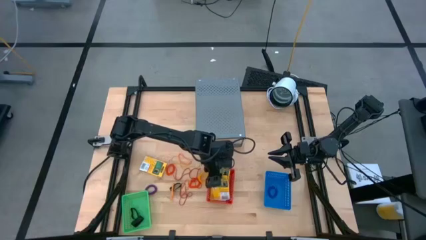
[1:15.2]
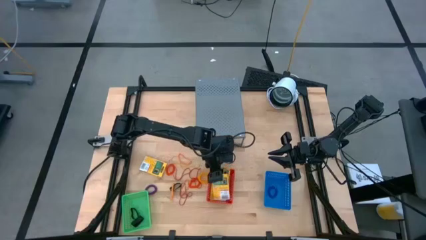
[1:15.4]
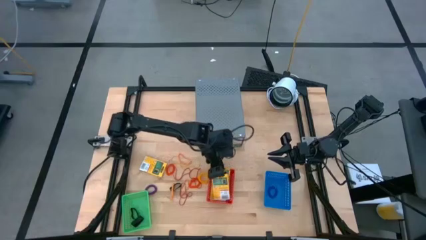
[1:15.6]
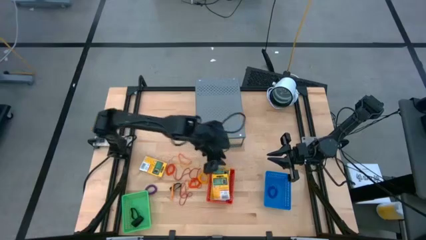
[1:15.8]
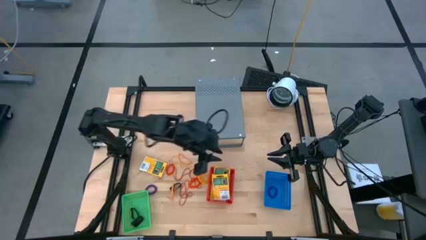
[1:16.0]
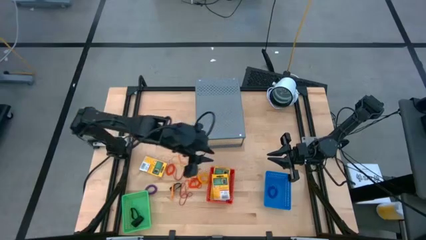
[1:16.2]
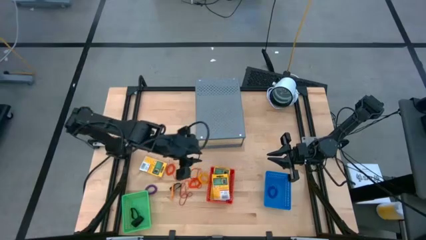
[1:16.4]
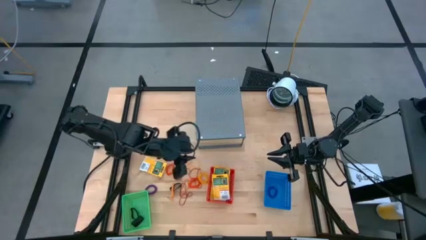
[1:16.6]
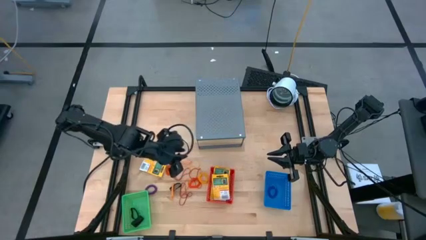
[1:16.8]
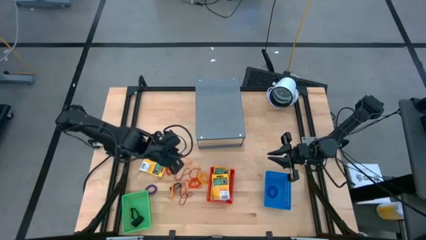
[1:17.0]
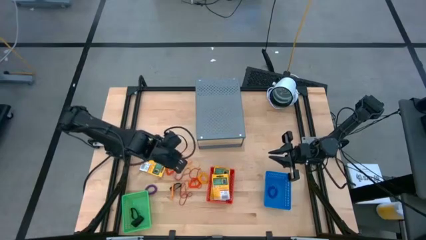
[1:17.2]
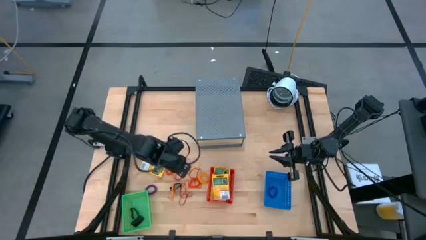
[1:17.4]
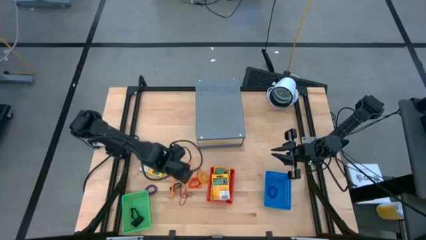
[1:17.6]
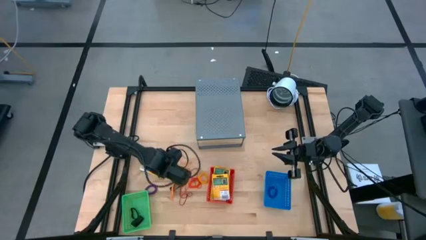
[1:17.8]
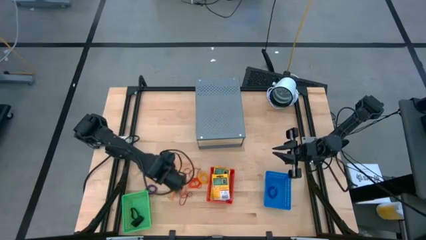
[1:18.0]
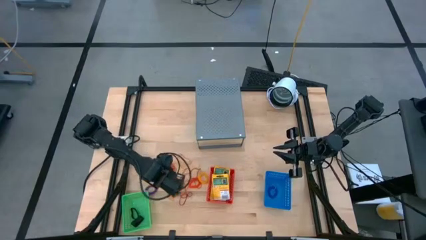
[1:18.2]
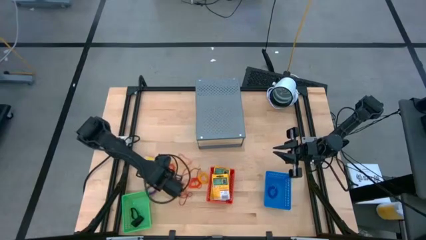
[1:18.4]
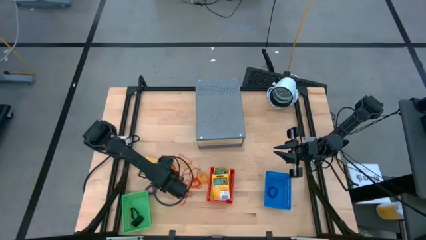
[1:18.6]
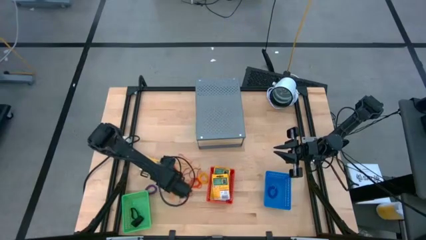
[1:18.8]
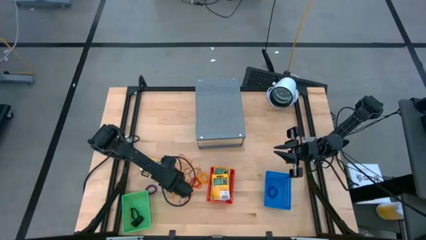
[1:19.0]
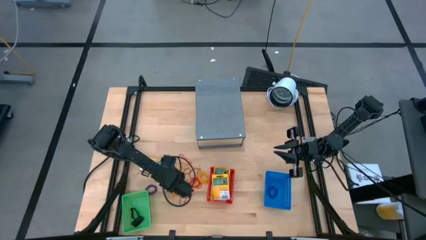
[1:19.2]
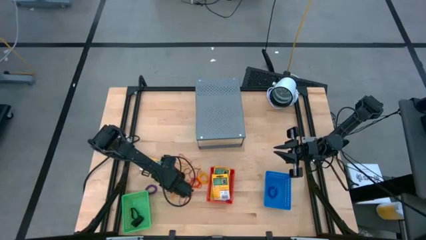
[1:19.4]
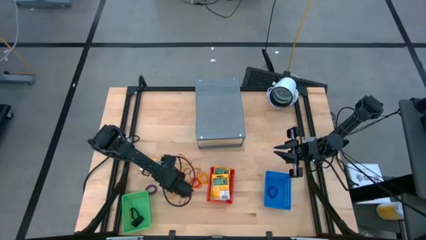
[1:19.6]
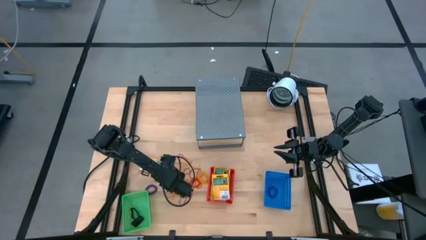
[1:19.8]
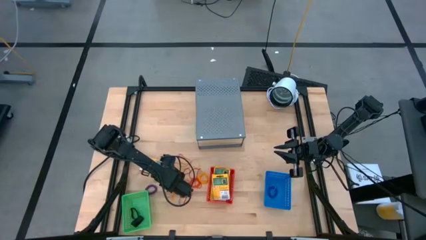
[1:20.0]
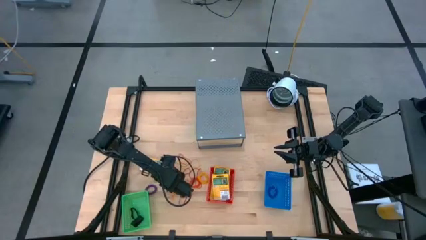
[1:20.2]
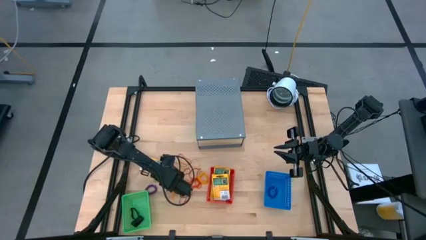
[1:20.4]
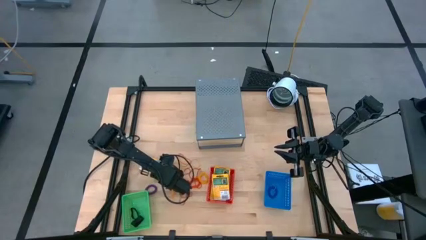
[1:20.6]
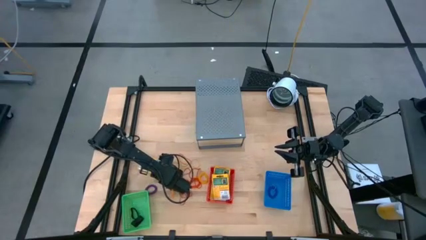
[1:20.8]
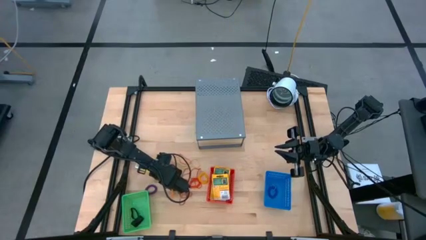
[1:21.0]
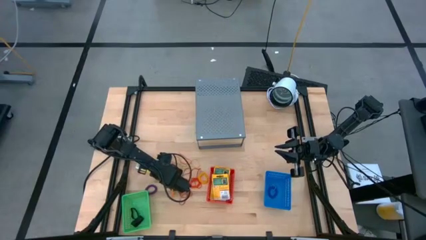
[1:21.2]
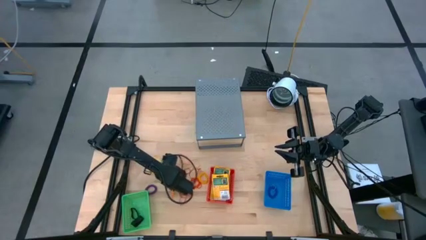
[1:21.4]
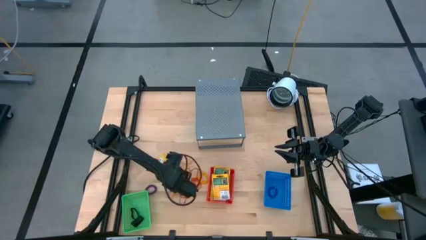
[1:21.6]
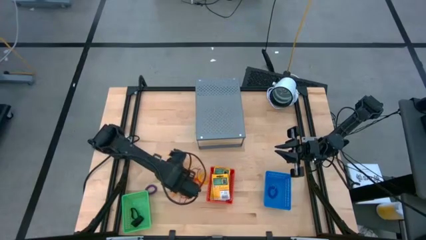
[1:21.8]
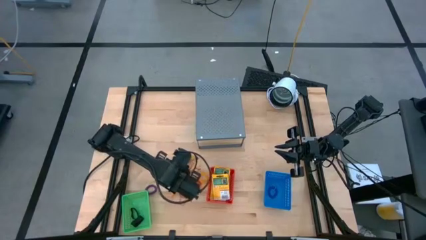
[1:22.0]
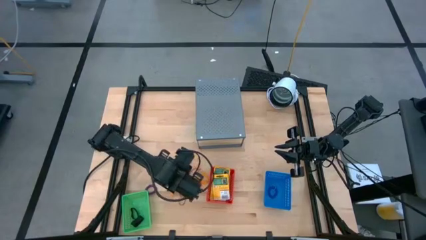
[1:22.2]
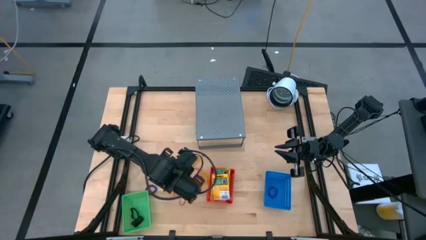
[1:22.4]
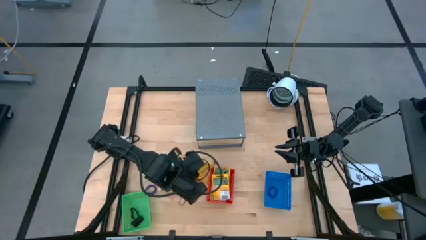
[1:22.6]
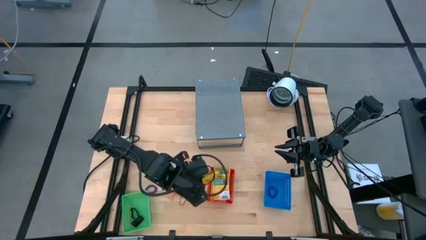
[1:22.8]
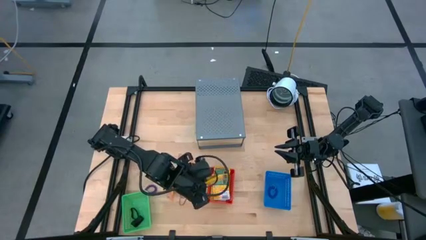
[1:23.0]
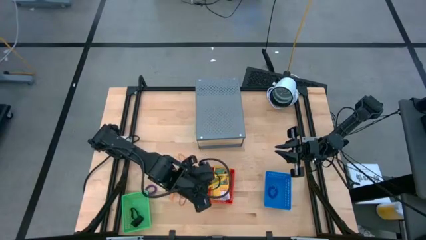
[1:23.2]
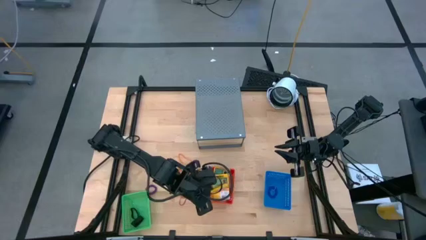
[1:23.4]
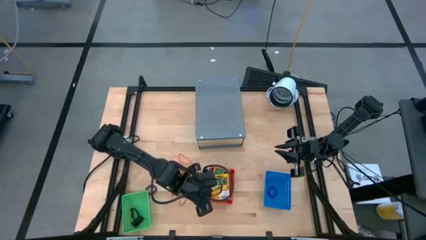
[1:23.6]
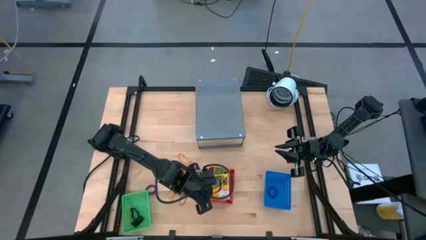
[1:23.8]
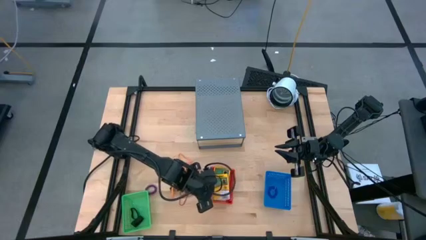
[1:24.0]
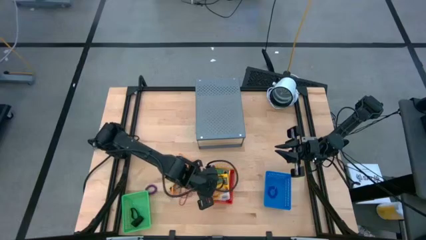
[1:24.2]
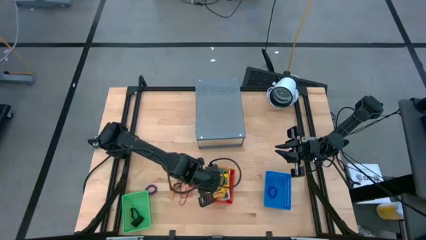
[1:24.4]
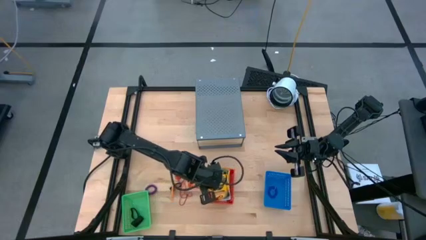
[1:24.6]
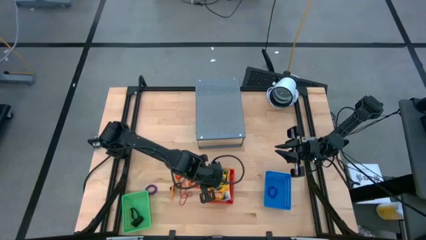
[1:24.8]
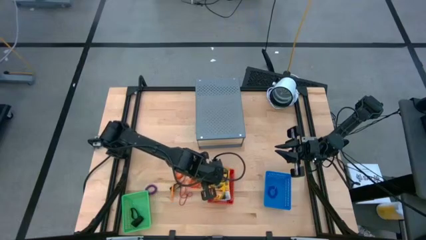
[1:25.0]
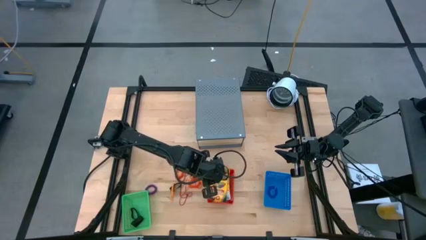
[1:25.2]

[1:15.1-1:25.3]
Task: Pick & Place Office Desk Supplies
Put the yellow crayon box into the red bin

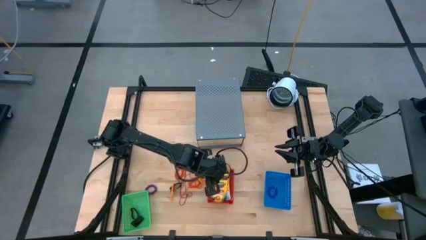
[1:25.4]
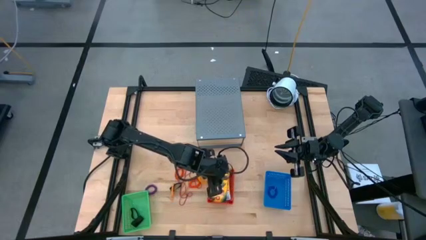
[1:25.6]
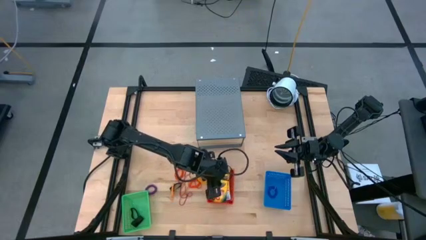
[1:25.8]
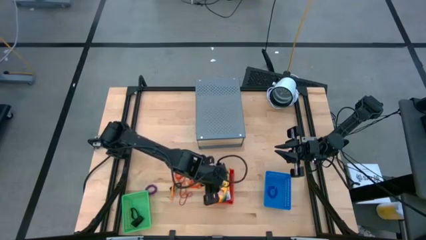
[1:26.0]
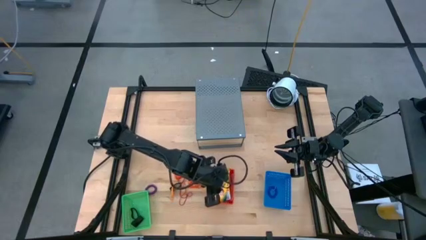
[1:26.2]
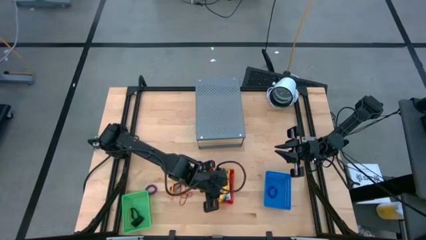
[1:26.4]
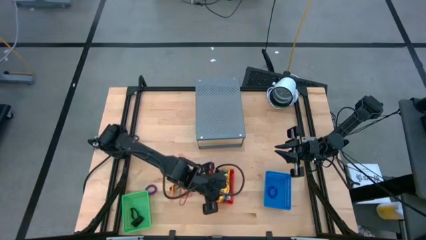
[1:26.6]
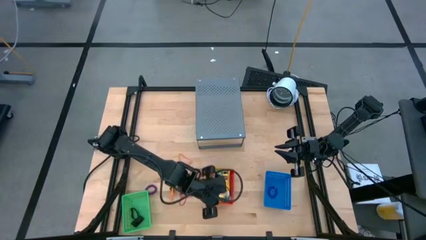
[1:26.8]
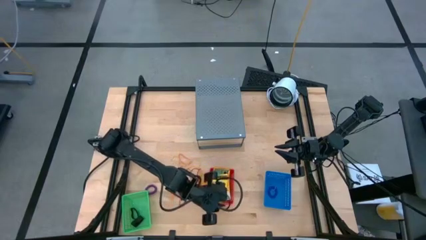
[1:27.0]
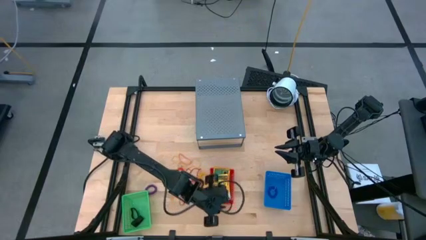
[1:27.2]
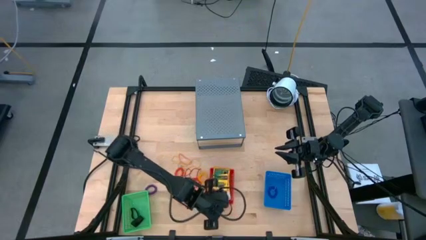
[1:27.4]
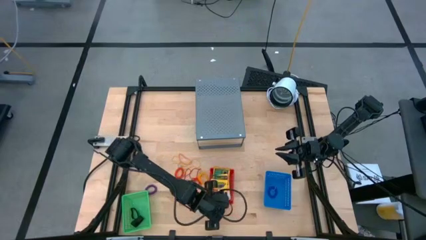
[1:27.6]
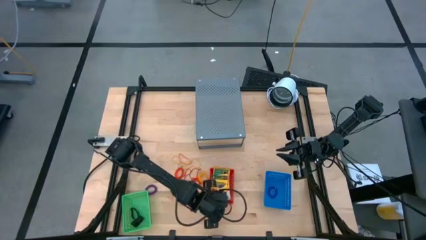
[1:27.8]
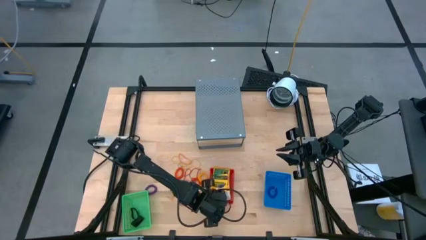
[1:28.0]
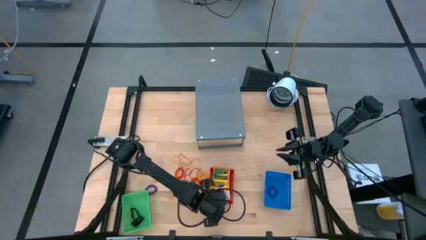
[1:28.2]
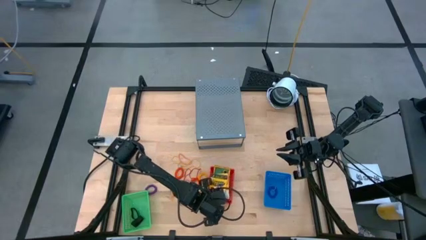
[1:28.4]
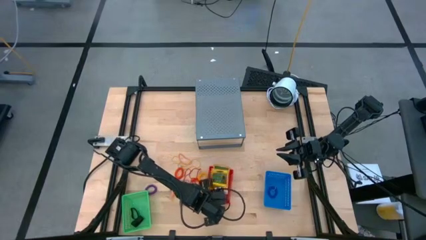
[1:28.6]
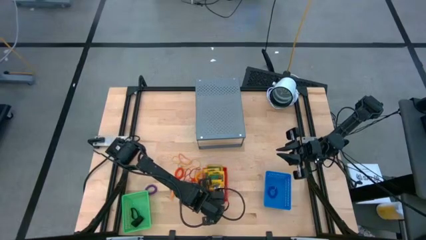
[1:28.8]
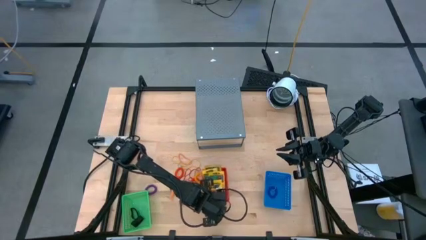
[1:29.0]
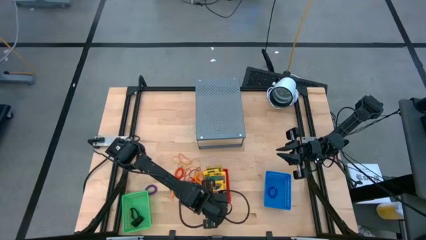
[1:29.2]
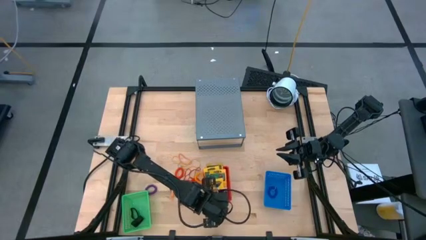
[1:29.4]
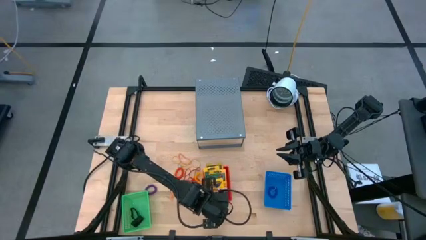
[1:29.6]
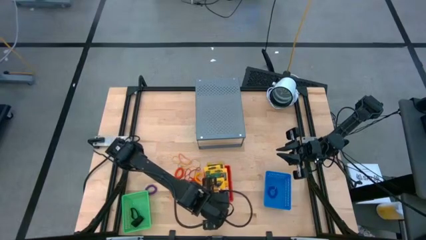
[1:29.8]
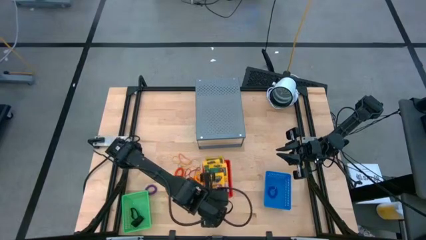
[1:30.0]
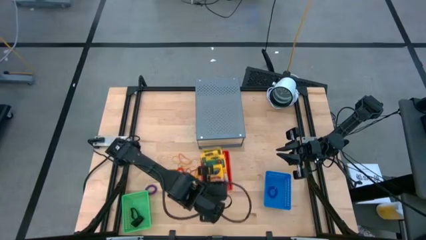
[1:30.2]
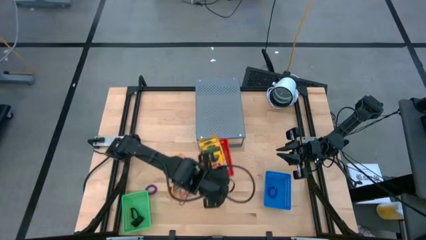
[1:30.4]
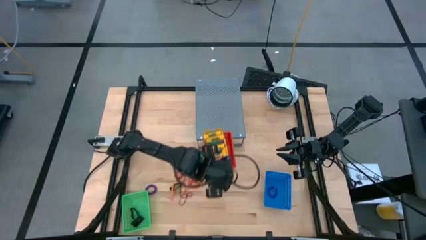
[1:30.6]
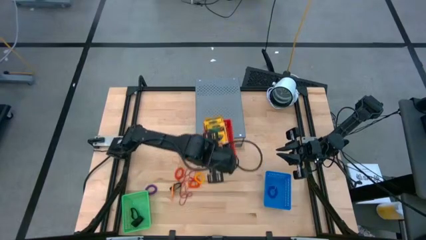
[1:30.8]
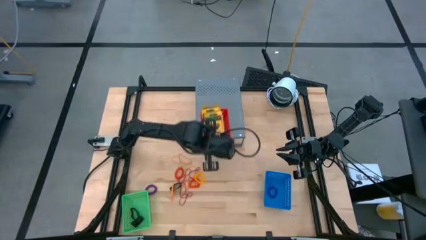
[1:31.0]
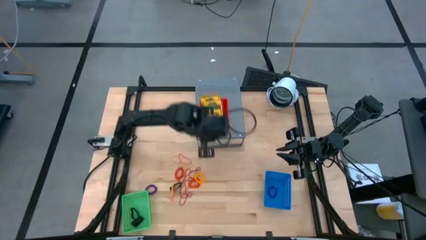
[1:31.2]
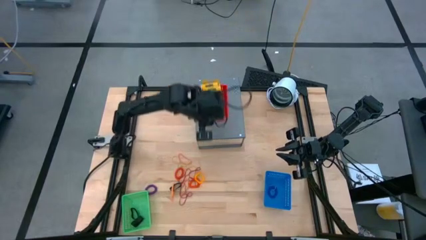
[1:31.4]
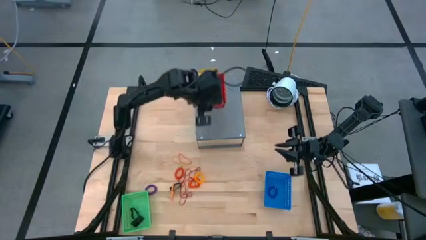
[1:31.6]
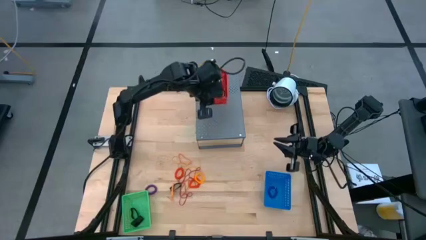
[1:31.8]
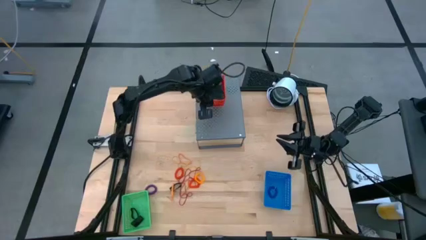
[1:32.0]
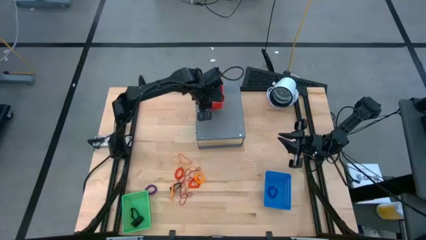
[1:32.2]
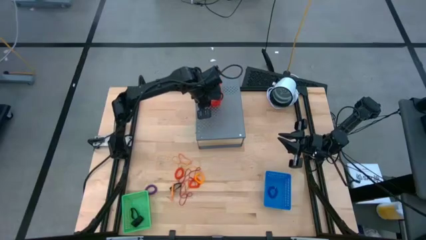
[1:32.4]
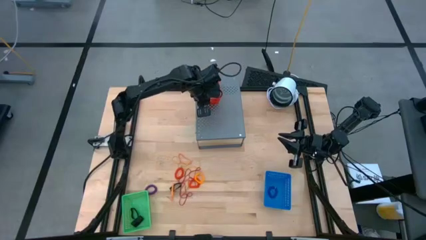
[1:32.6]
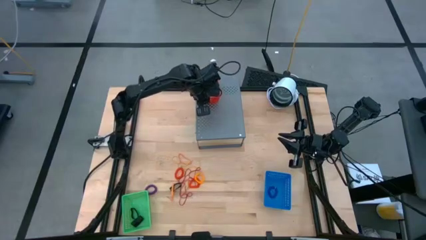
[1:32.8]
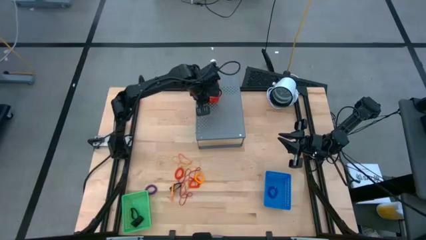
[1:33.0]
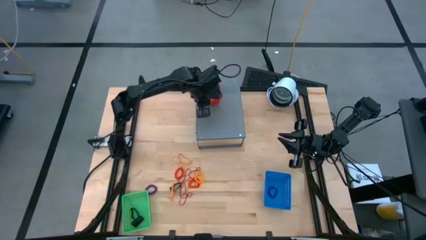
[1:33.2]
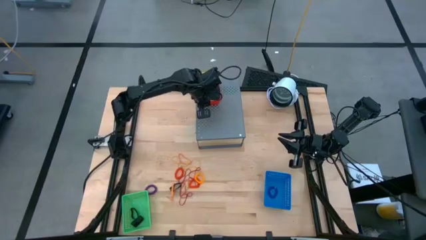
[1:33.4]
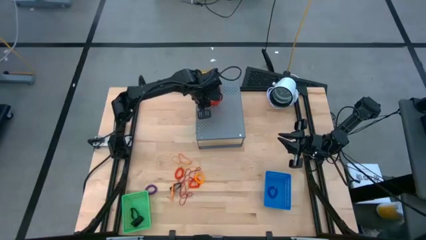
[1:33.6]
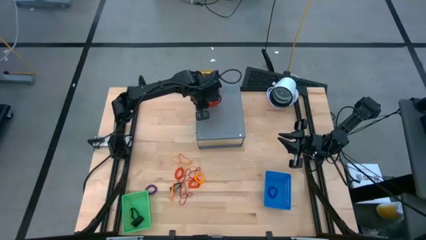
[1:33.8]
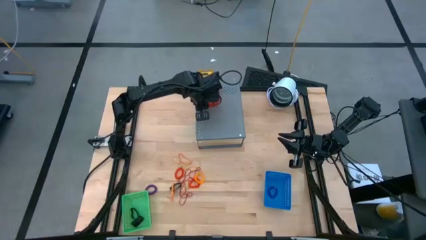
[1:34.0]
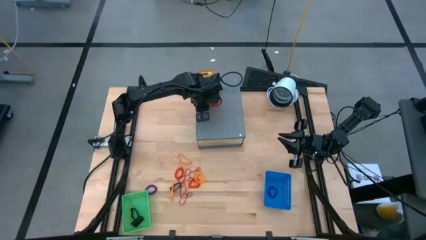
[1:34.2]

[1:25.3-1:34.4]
Put the red bin on the shelf
